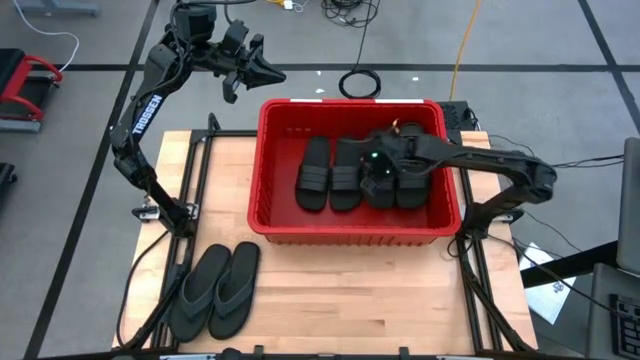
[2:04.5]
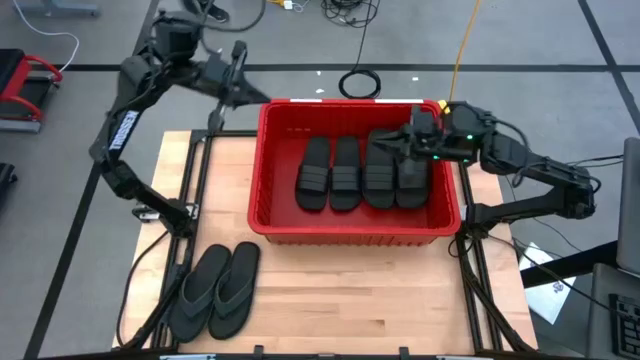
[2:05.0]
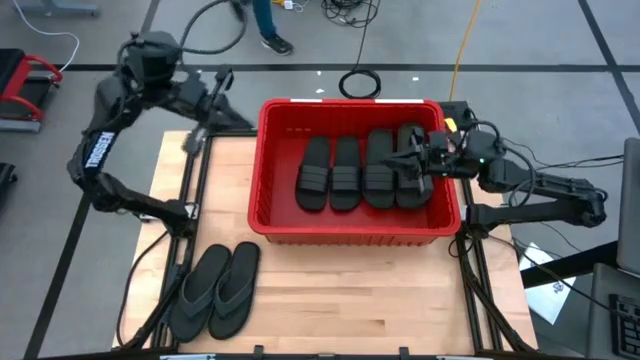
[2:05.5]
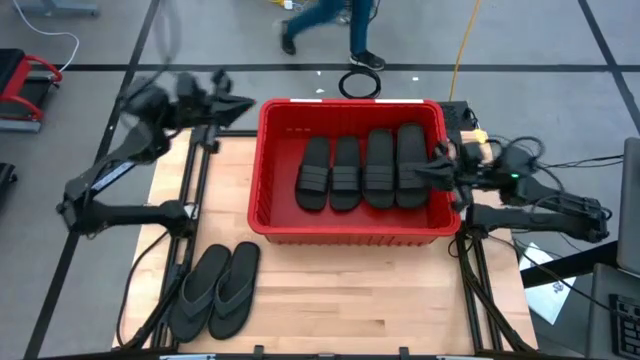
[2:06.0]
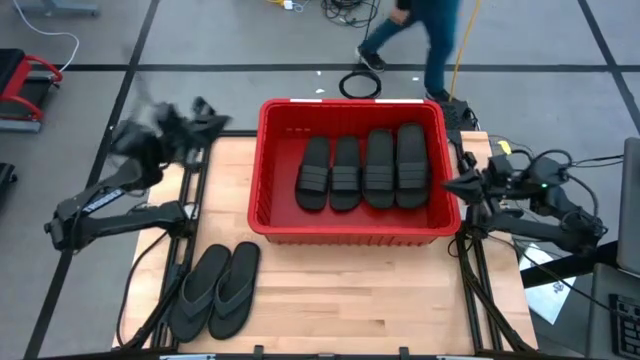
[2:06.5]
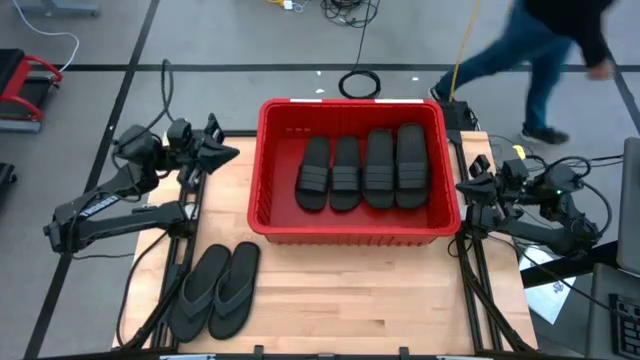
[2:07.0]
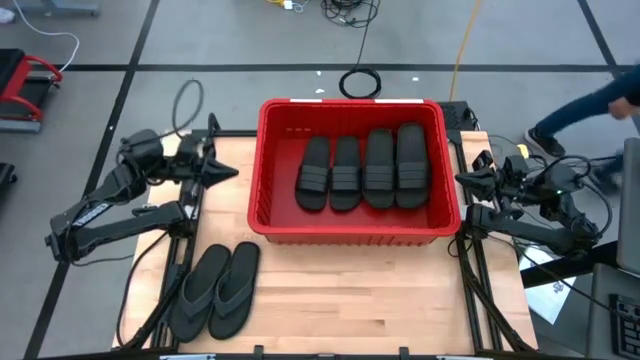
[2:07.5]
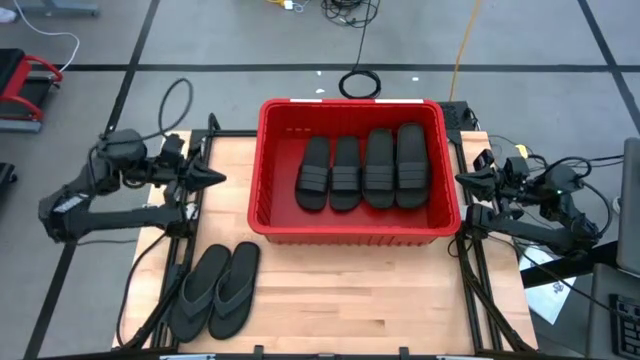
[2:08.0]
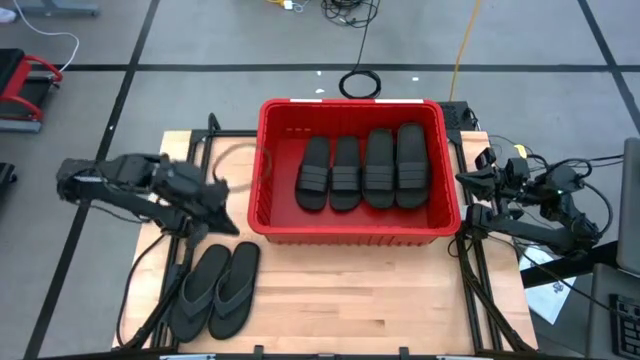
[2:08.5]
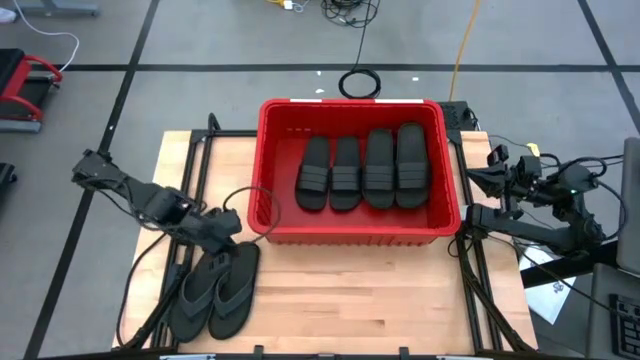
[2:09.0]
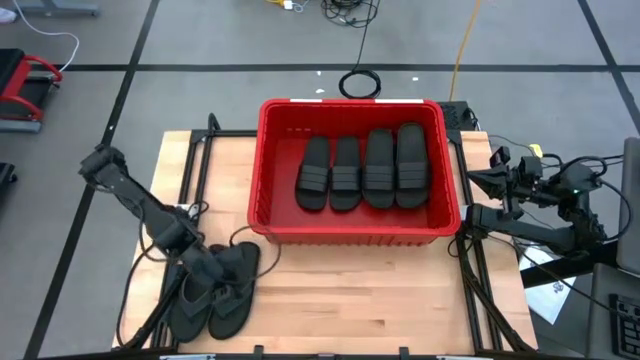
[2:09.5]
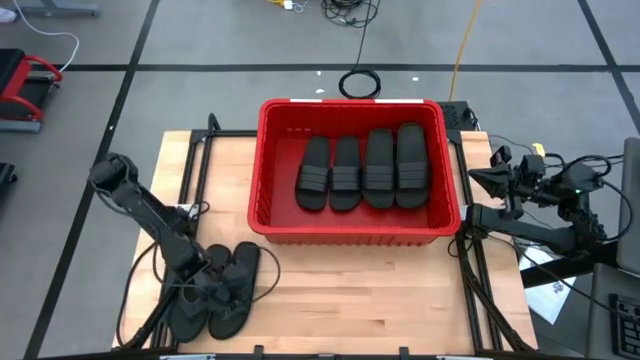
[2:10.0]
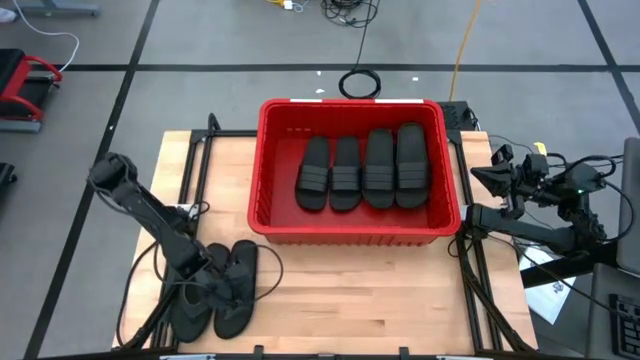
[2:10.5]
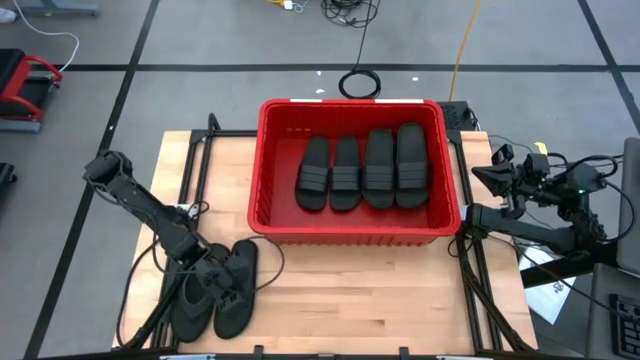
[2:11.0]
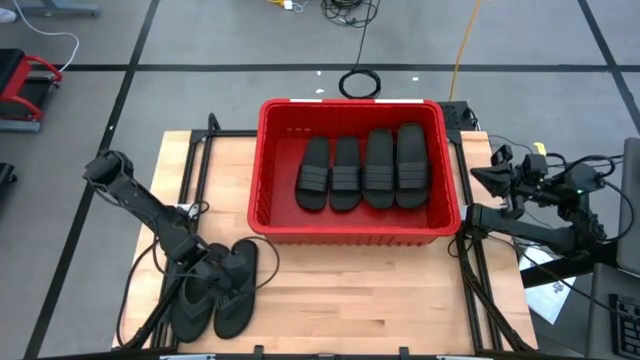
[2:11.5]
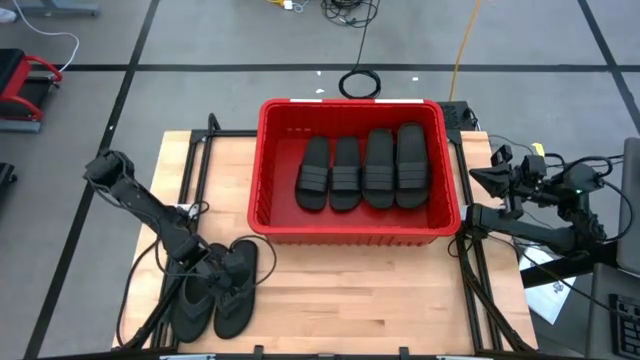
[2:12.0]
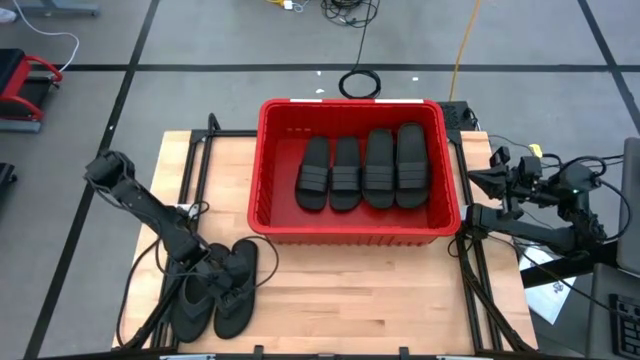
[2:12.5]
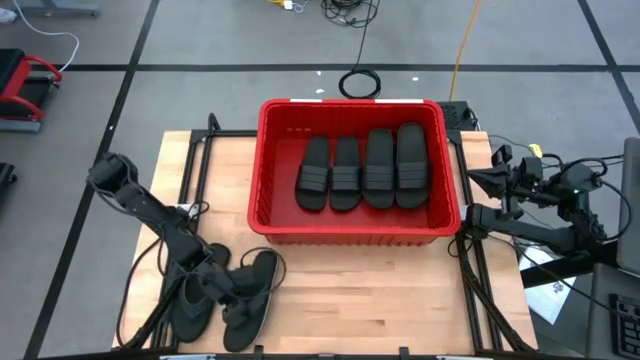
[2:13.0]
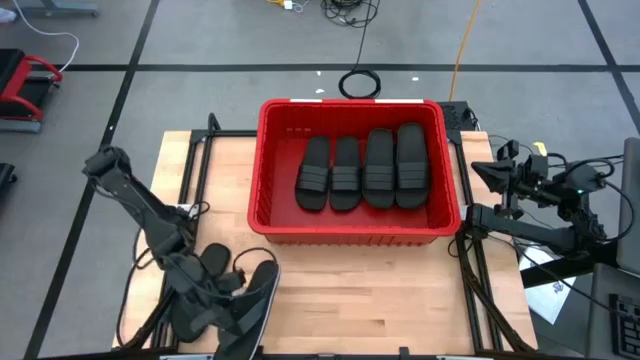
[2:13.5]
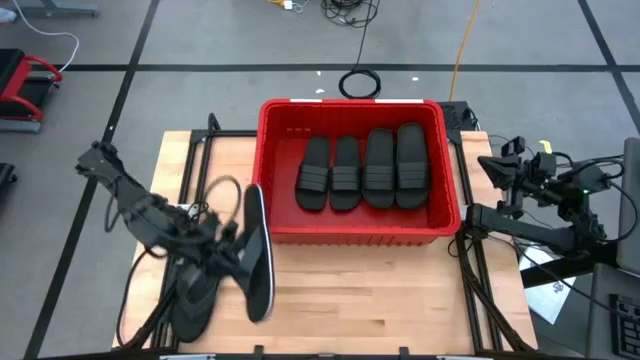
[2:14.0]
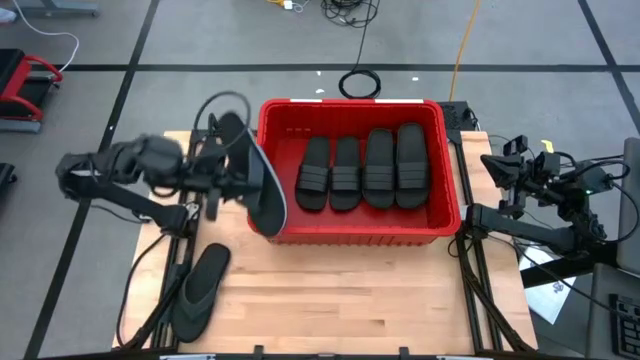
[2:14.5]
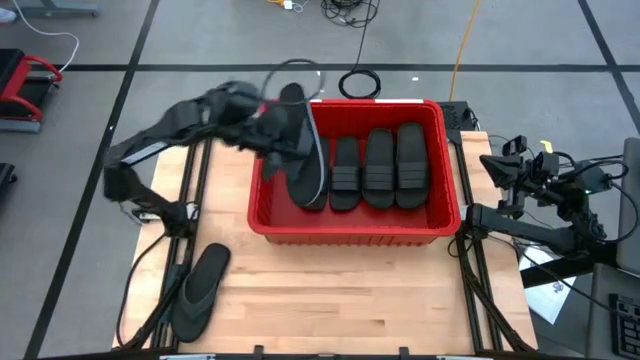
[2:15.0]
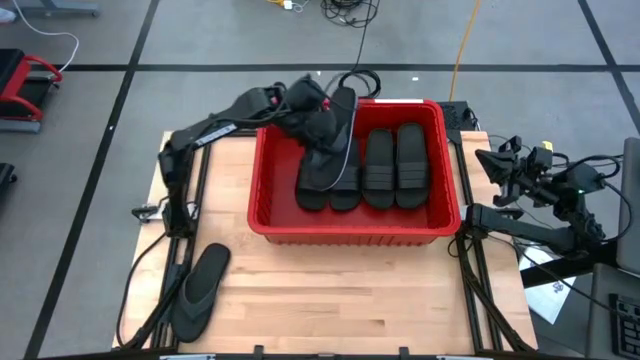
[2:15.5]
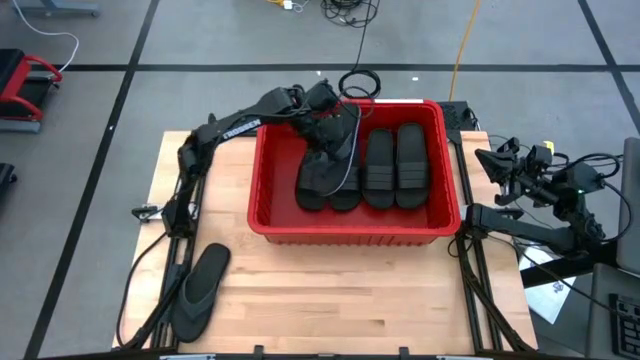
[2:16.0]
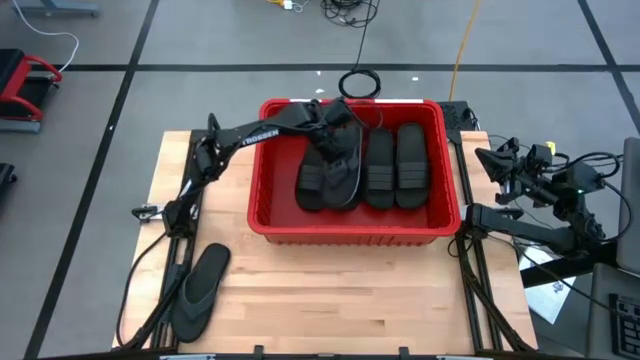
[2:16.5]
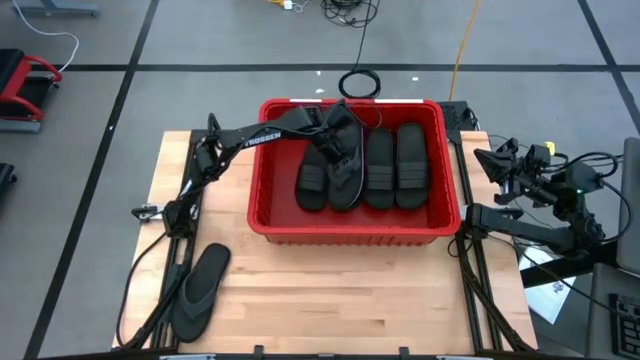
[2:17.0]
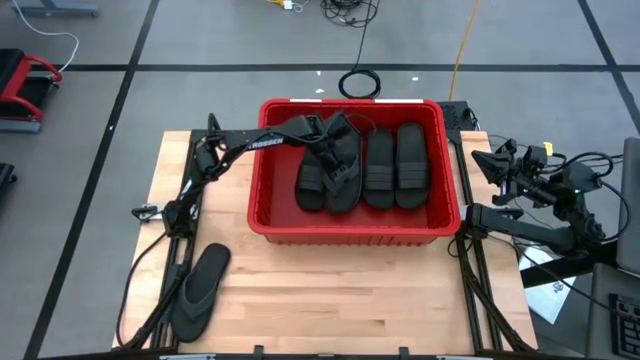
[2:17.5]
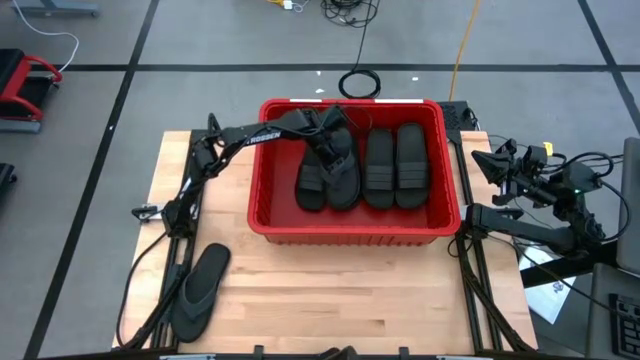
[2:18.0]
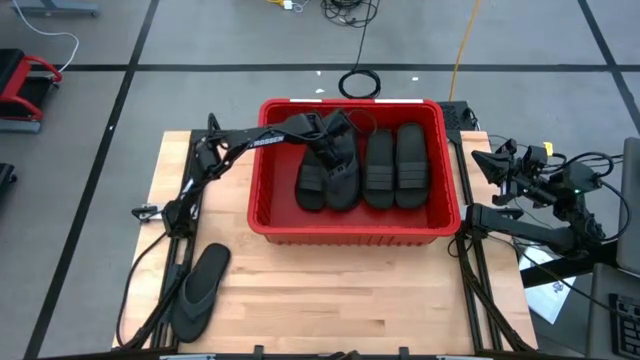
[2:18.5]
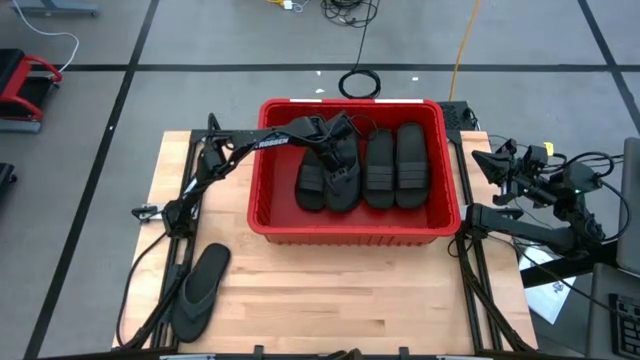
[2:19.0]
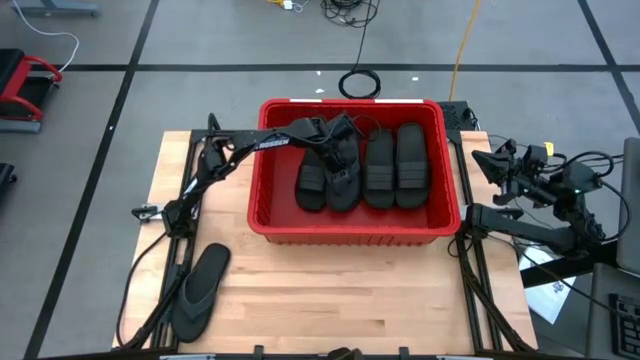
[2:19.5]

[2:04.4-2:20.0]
Task: Pick and place slides into bin
Put the black slipper into the red bin

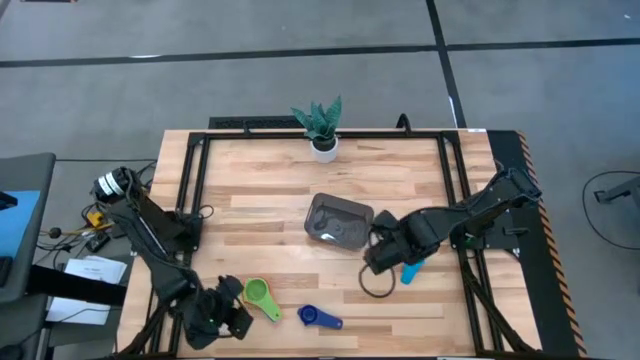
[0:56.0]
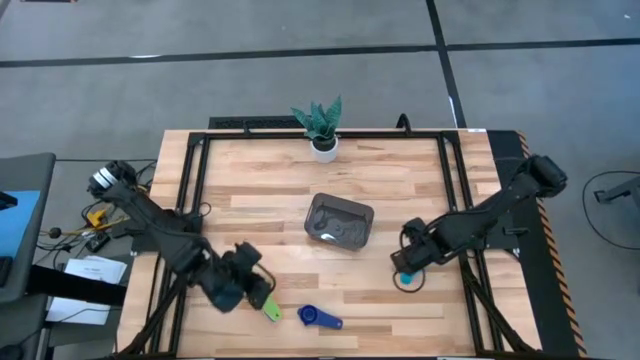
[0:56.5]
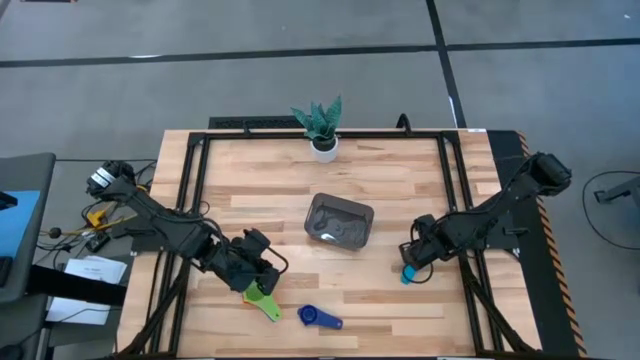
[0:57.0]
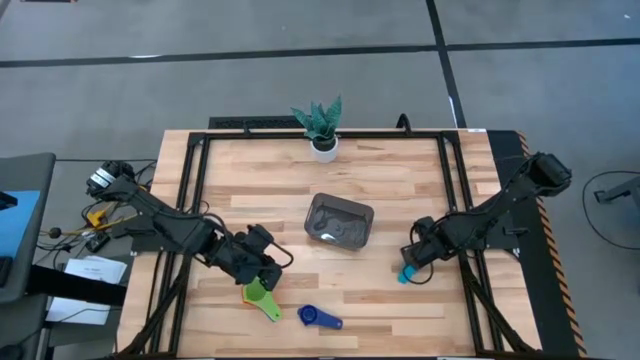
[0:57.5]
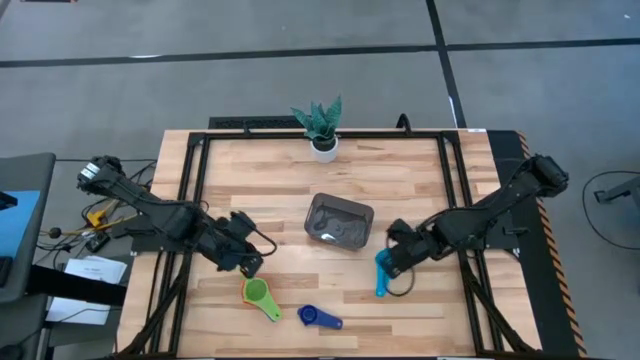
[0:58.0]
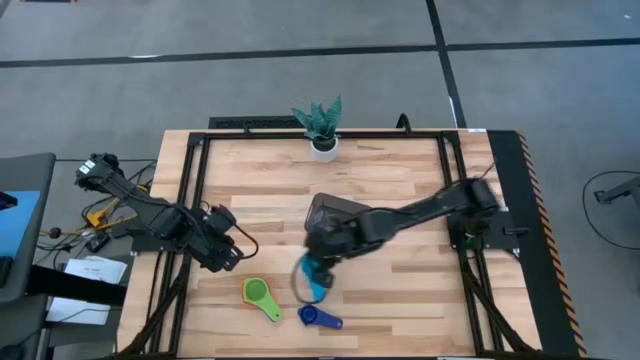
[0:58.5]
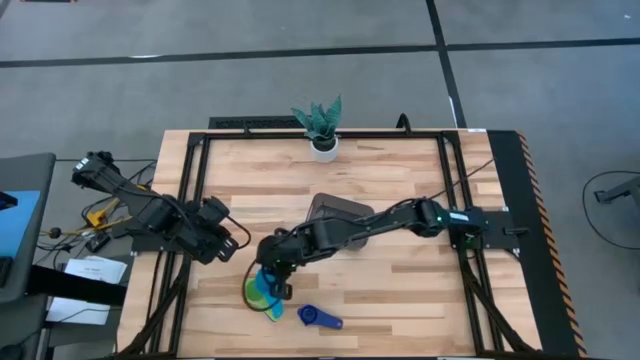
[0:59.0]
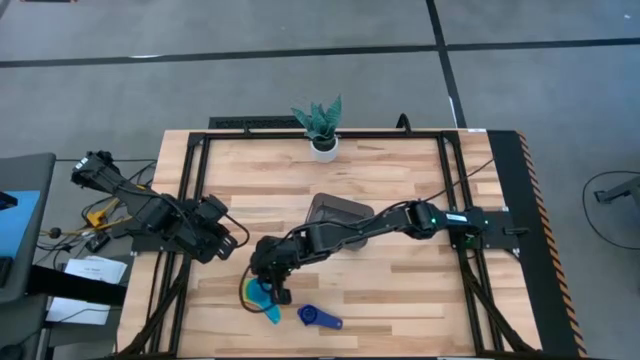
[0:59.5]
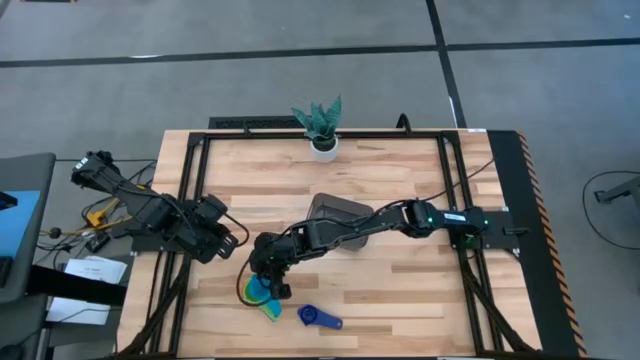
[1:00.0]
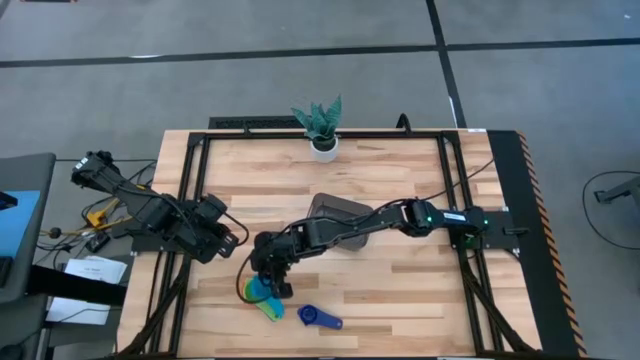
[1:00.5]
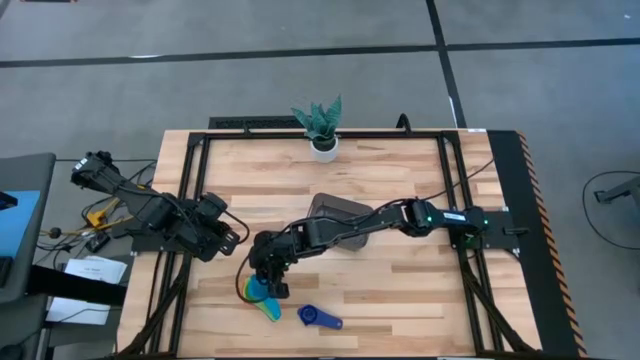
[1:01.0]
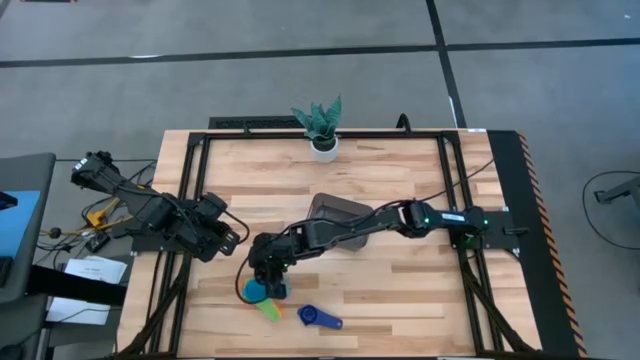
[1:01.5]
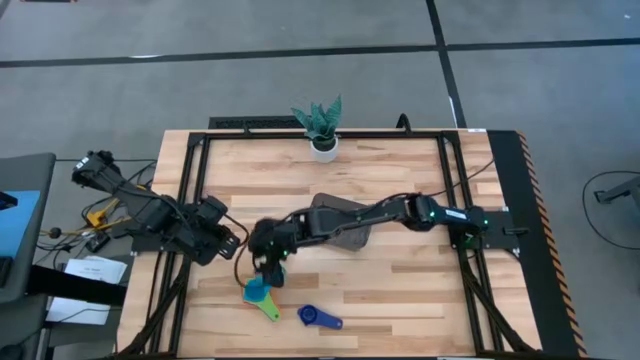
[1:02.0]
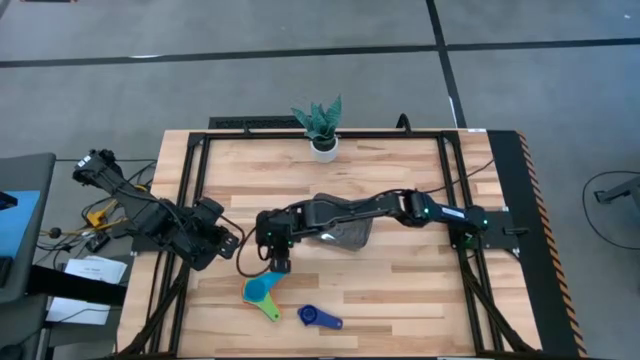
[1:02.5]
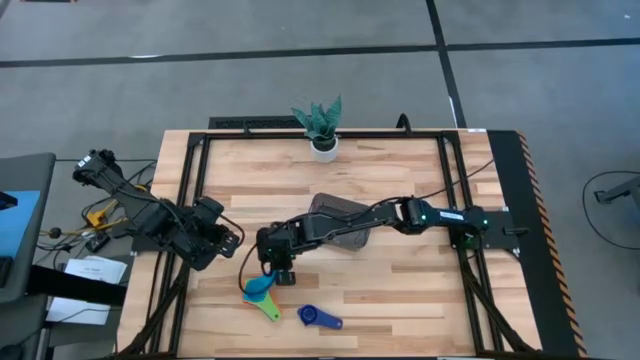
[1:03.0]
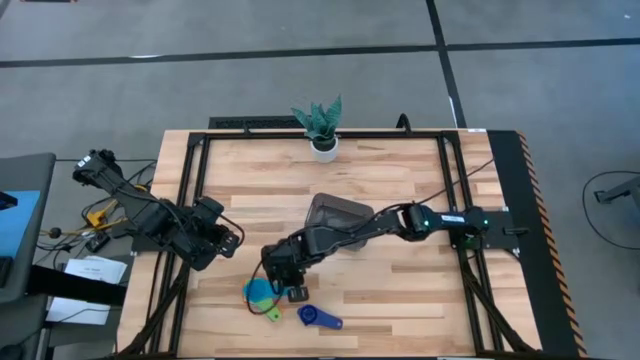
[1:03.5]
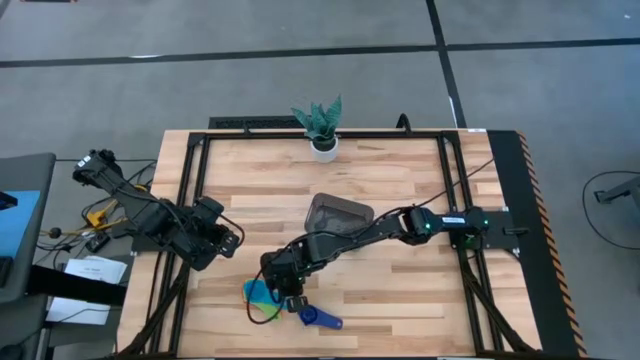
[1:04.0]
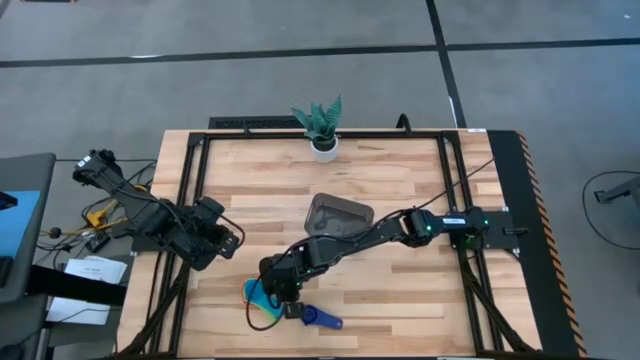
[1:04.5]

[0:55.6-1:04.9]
Task: Nest measuring cups in basket
Stack the light blue measuring cup on top of the green measuring cup
